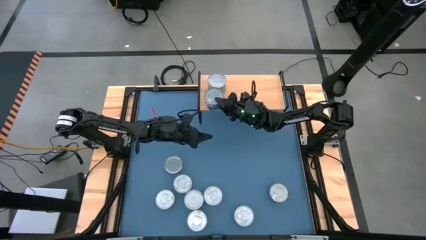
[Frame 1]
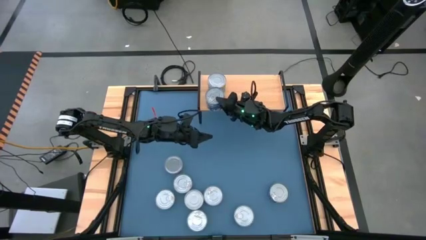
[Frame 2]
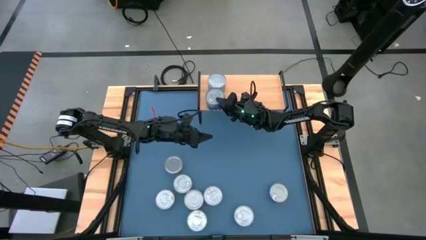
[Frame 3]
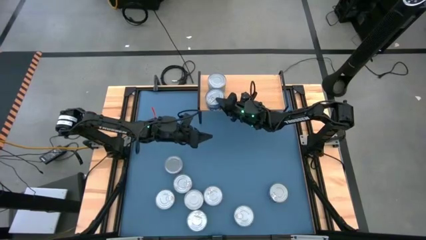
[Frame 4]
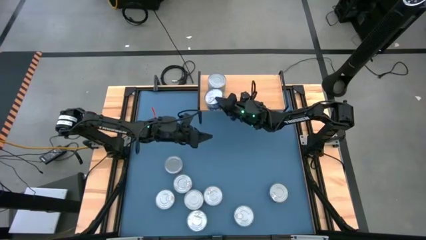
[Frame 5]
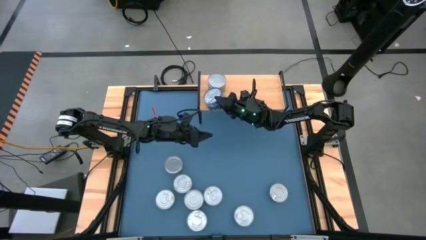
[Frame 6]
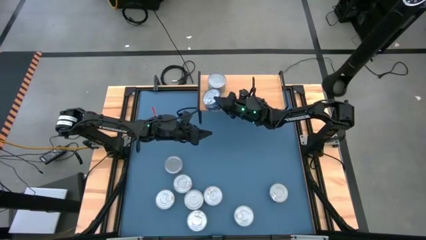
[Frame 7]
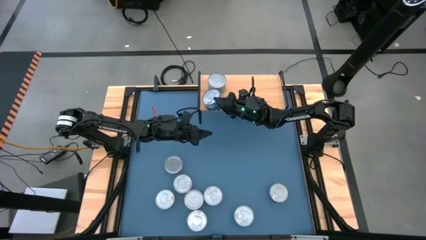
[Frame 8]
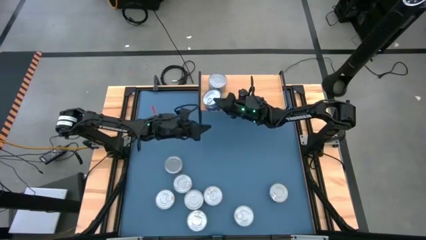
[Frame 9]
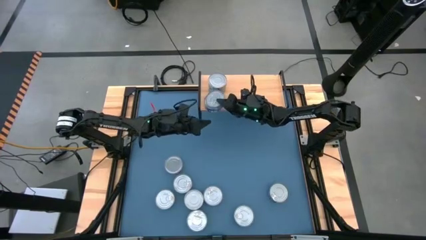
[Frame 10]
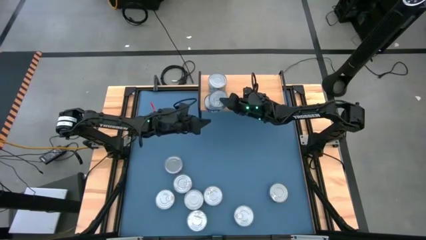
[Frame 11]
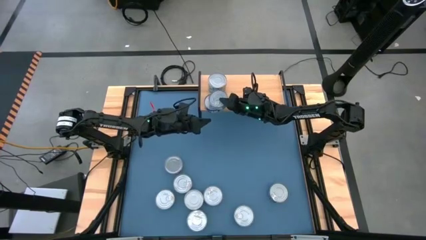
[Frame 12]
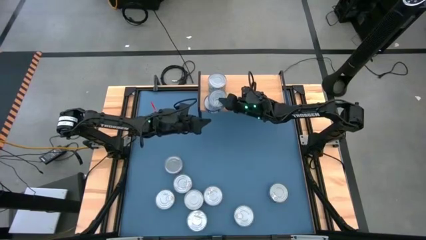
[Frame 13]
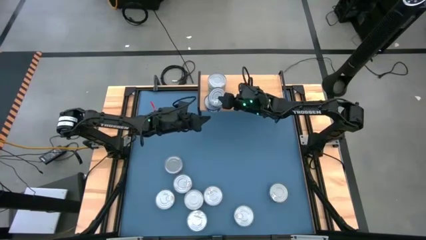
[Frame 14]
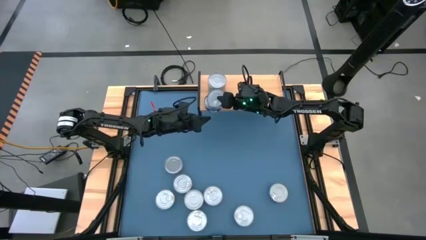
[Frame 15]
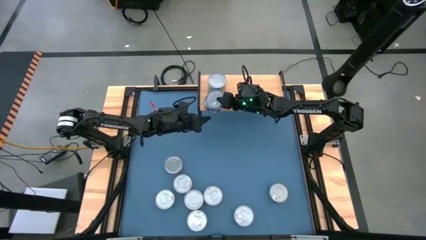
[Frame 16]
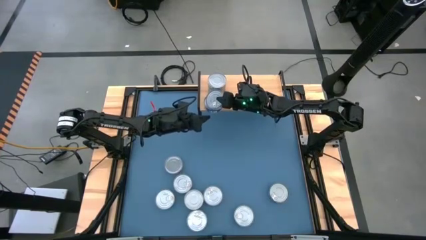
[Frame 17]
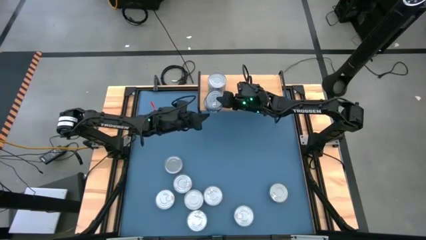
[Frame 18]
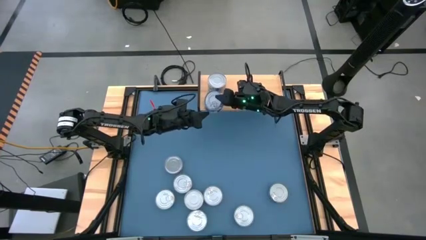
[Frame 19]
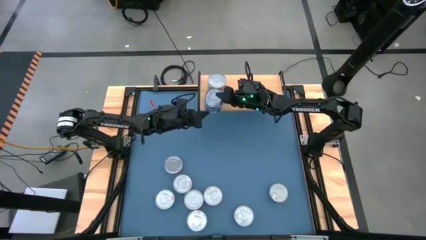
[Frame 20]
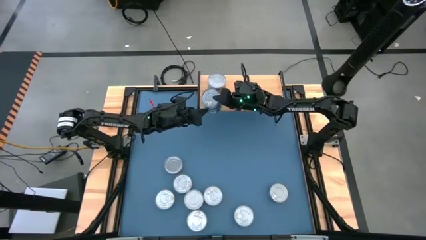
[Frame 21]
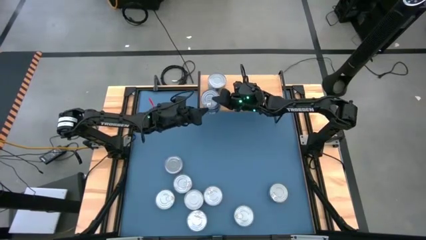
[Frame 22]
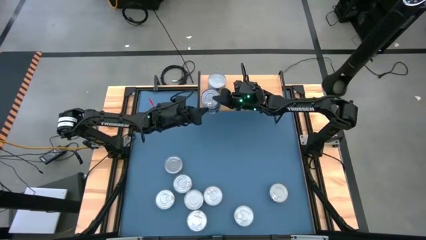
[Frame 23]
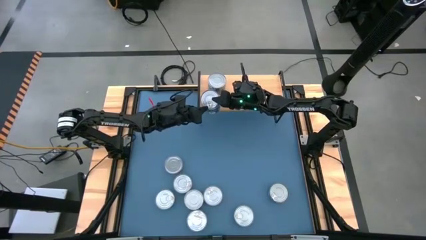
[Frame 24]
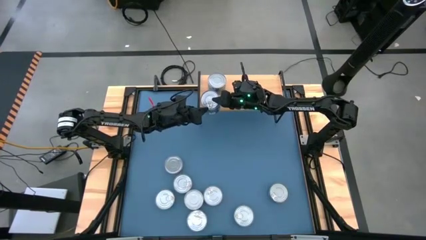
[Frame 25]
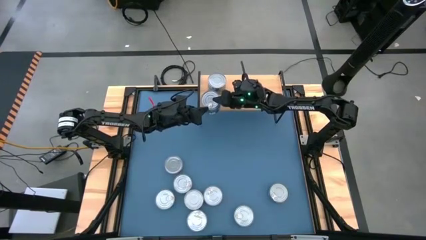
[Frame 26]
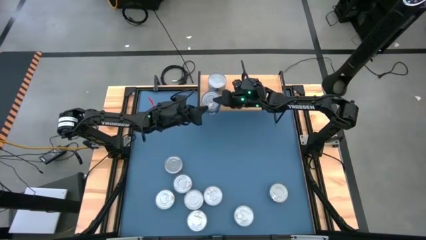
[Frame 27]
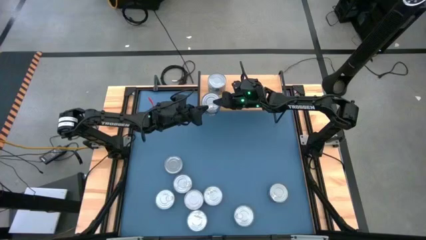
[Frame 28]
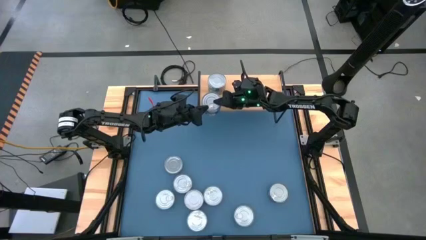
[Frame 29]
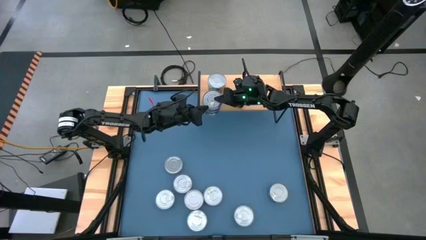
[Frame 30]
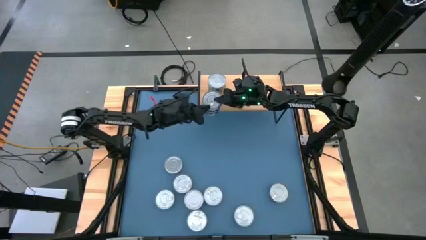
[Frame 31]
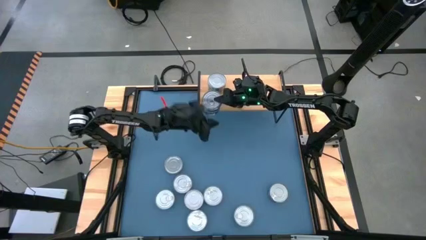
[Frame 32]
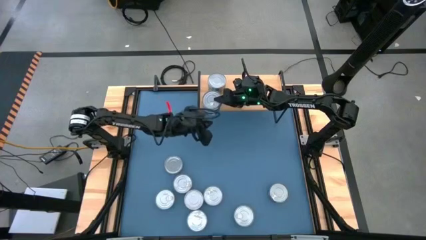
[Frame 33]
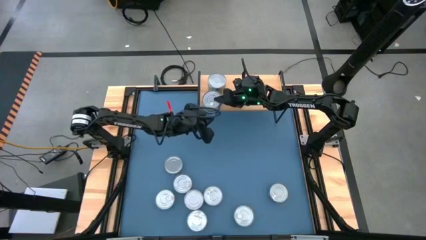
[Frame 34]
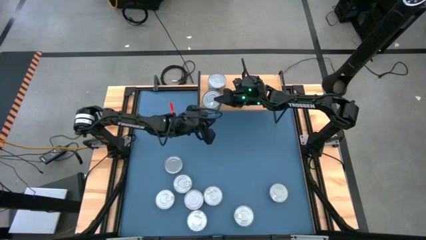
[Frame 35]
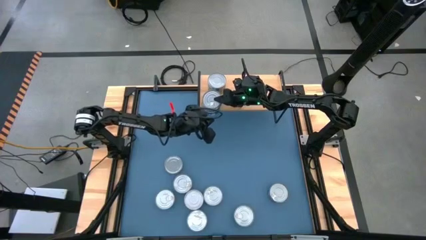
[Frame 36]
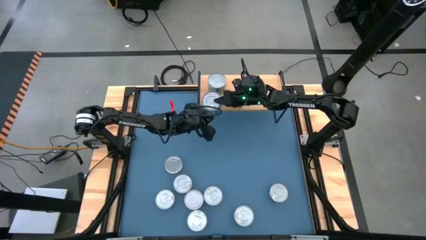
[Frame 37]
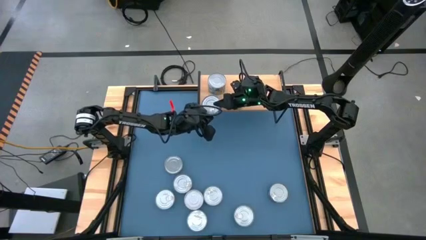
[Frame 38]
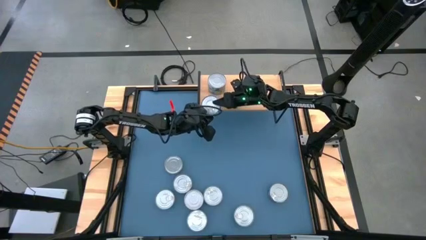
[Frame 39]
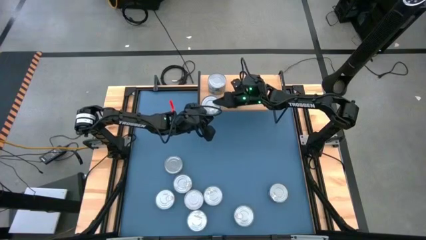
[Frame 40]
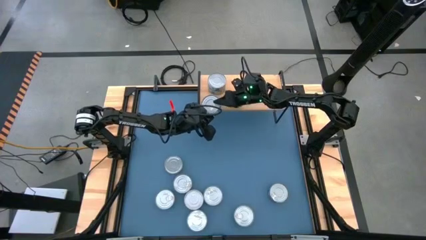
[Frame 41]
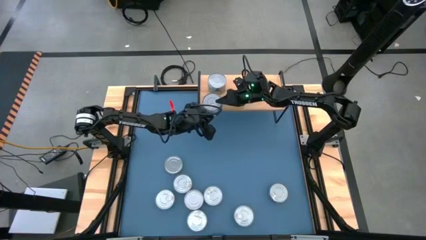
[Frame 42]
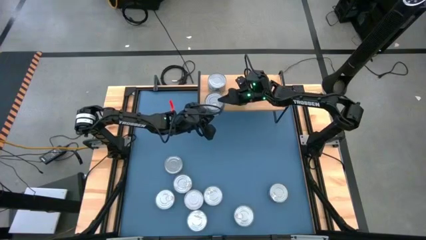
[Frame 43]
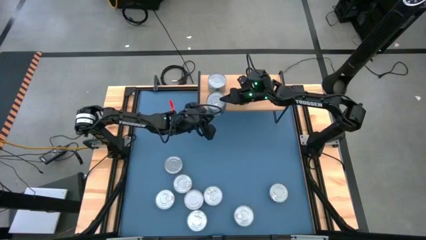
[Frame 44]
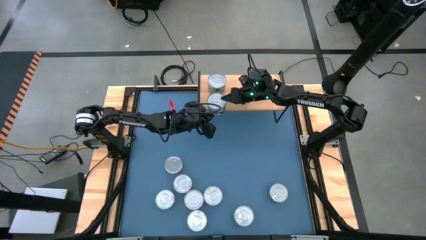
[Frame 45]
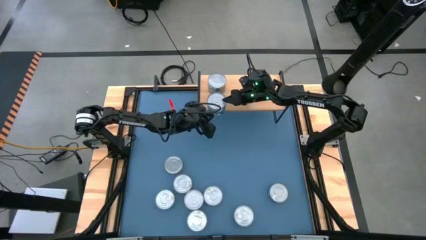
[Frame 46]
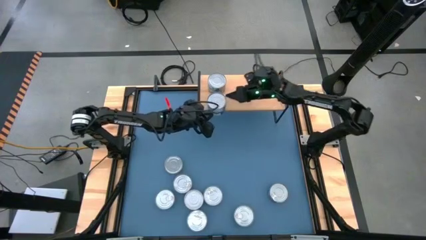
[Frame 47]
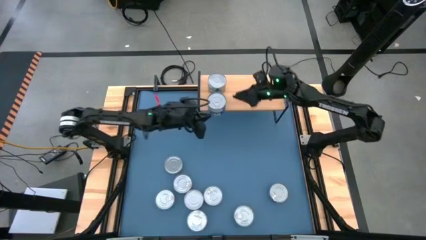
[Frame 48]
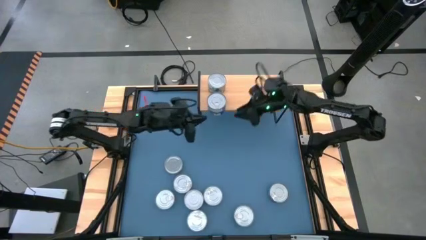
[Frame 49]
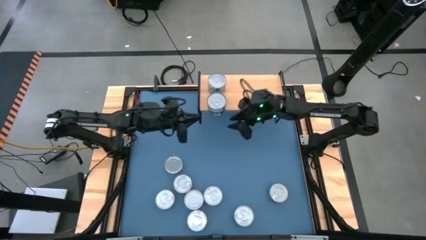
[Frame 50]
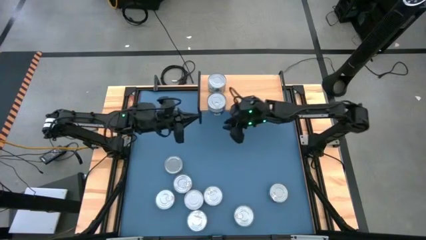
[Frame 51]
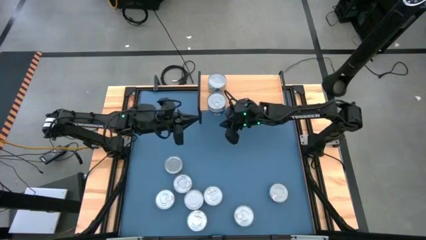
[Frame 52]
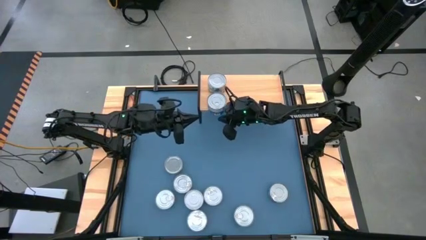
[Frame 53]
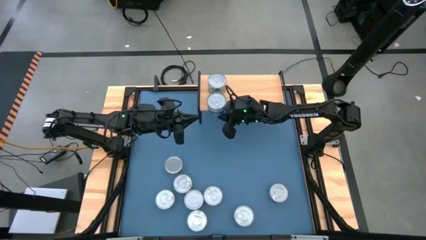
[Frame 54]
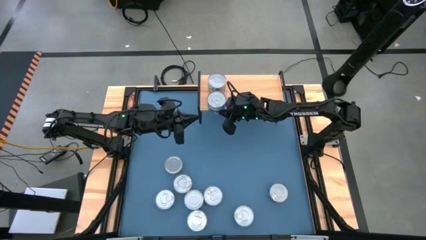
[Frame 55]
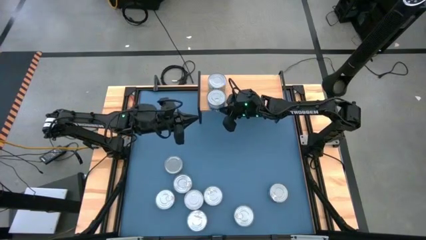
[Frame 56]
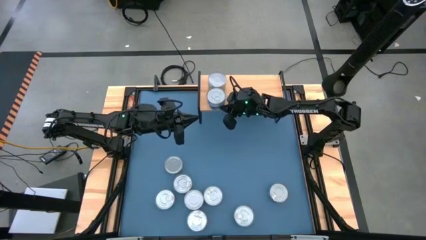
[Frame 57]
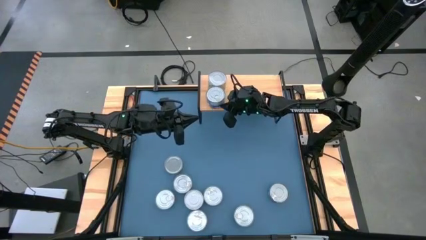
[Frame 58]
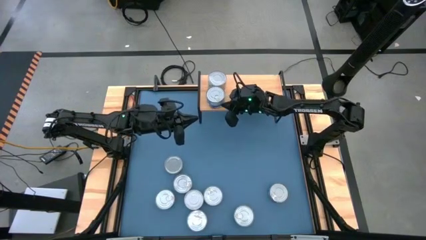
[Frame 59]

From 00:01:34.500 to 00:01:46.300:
Task: Stack canned seafood by type on shelf
Stack the blue tuna can on top of the blue tuna can on the shelf

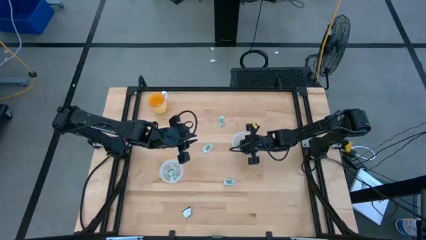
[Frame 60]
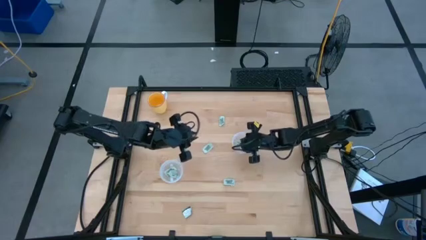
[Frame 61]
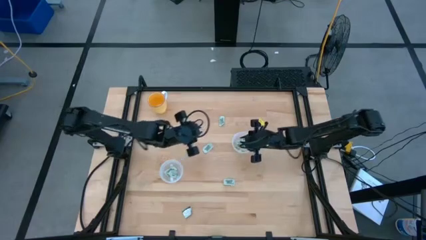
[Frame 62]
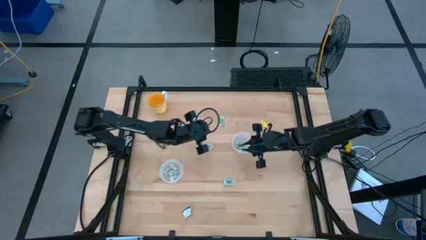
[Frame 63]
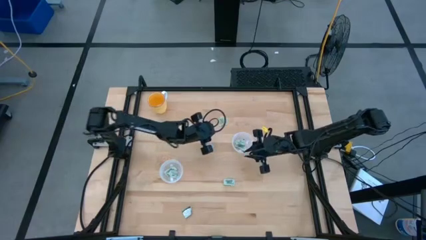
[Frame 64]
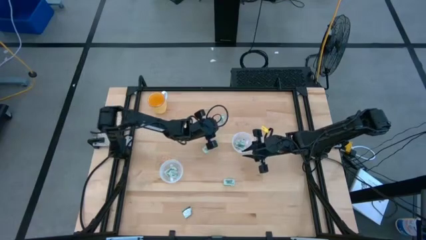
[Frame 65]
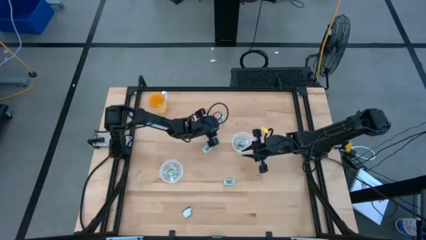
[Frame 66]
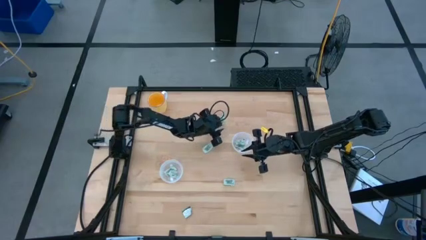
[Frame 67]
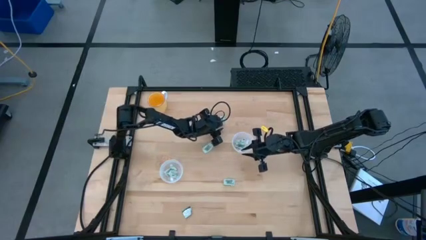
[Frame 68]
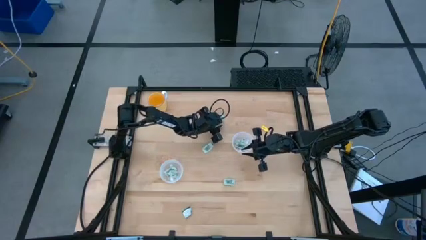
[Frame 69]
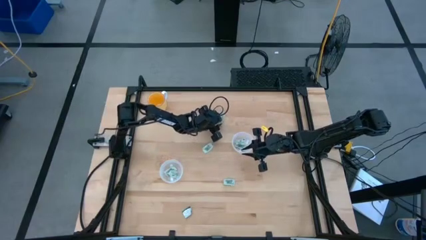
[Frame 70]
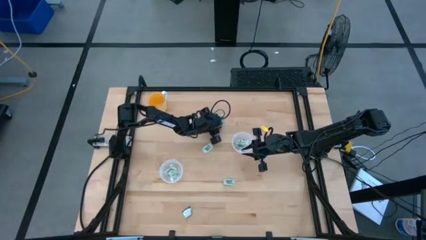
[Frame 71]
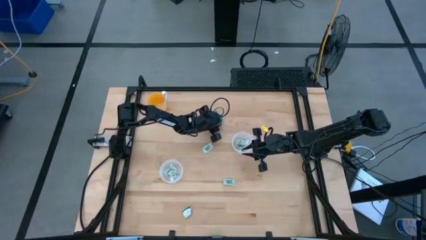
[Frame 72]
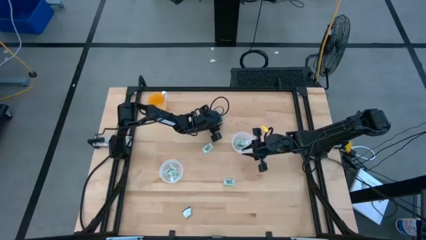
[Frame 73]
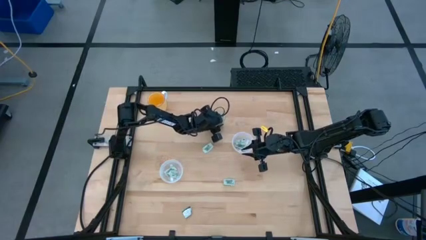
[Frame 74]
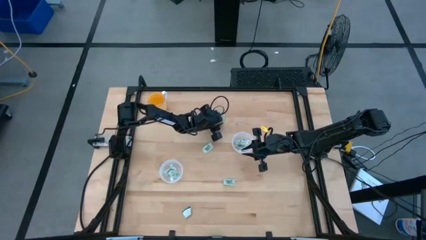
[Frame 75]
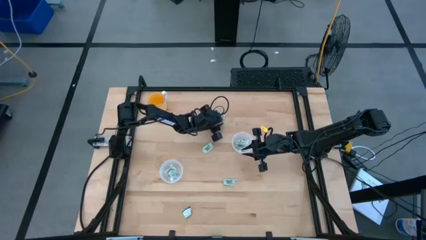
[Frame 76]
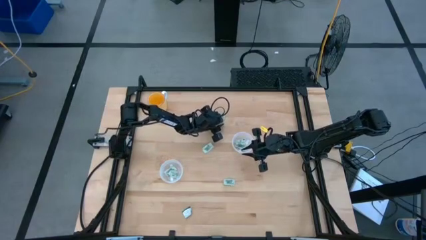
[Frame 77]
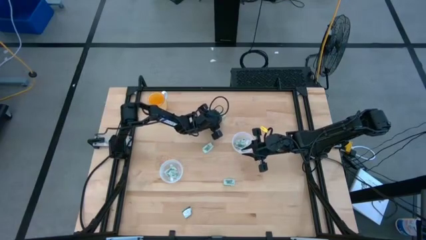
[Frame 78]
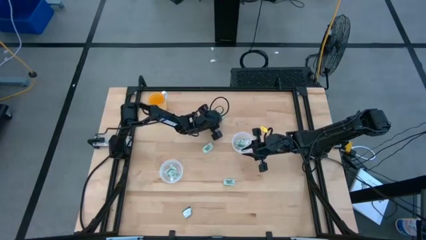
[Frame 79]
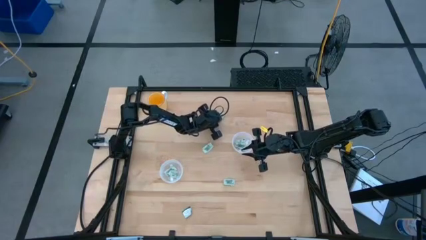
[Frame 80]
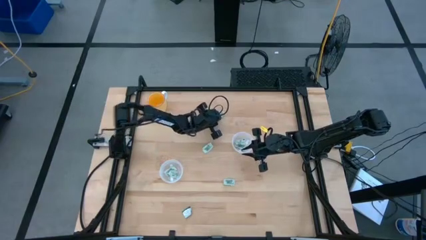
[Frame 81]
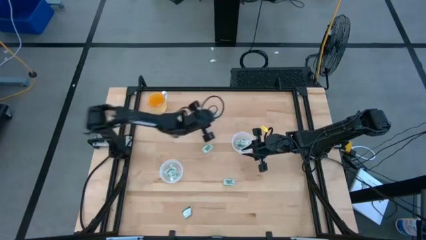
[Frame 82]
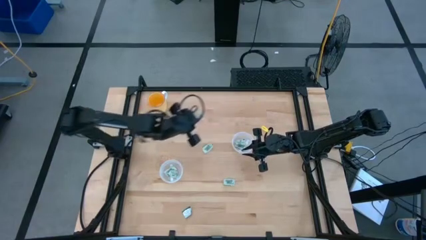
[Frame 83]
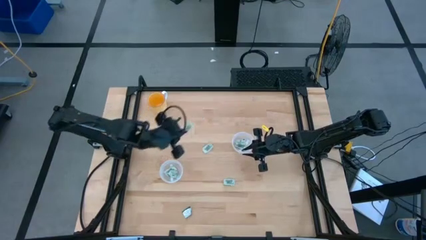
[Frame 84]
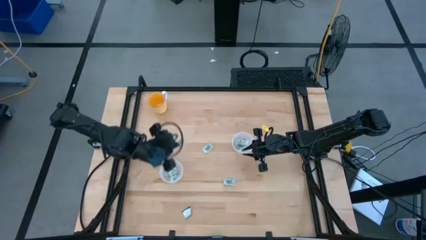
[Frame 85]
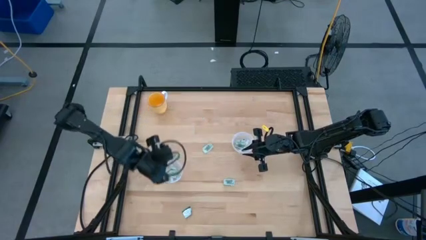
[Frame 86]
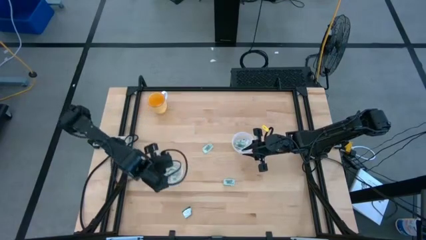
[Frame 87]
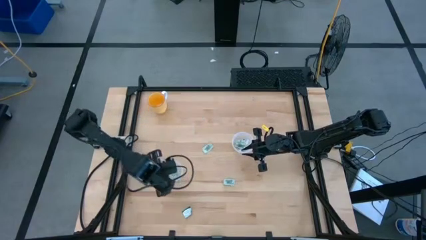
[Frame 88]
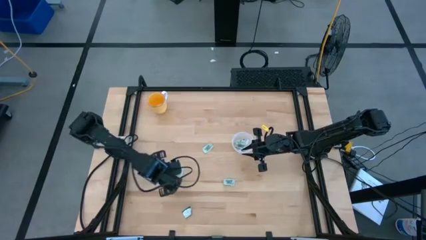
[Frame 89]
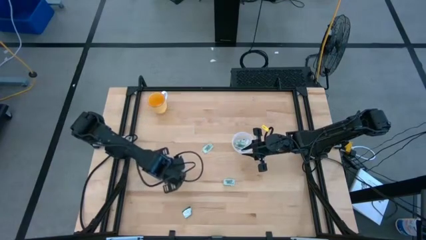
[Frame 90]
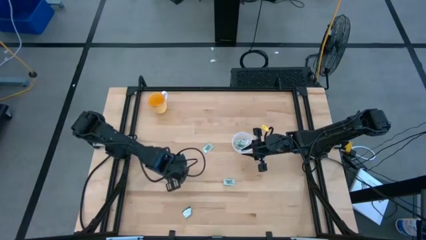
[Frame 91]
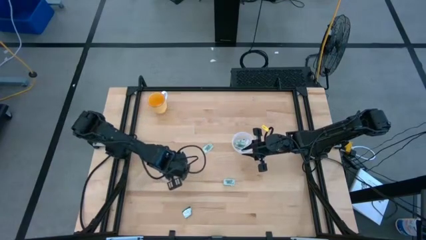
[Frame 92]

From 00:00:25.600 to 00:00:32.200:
Task: Pick and place Stevia / Truvia into bins
Put the white stevia packet into the bottom transparent container
